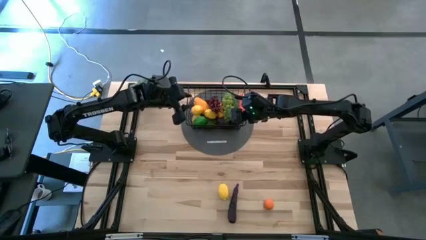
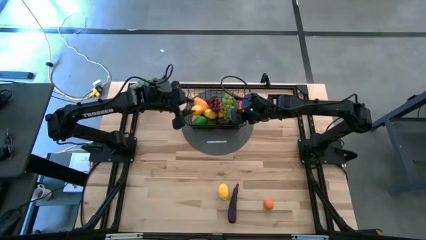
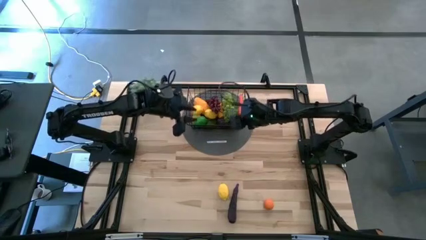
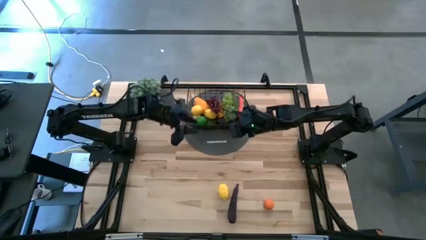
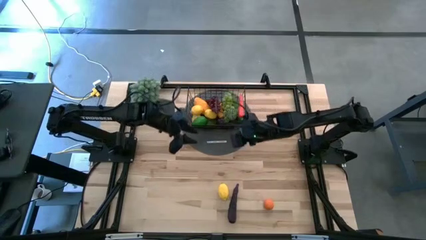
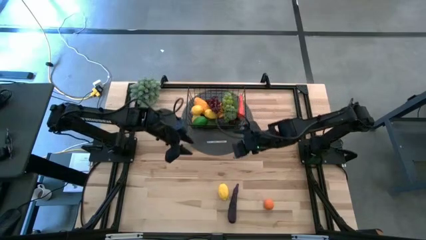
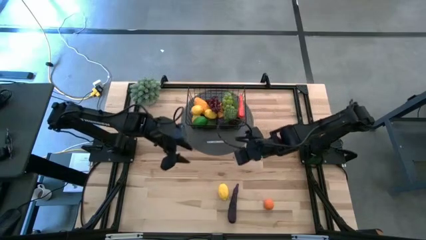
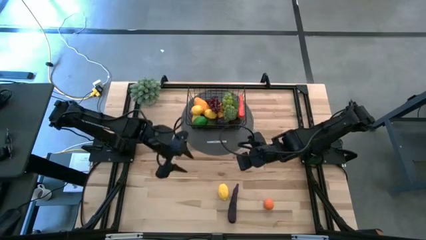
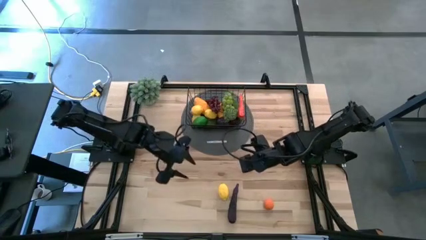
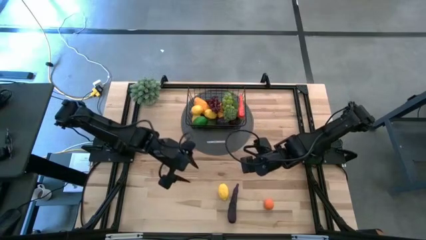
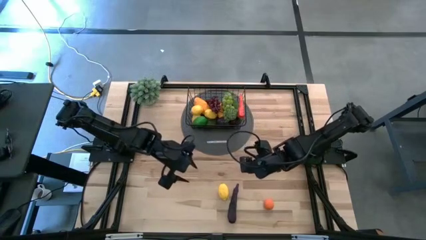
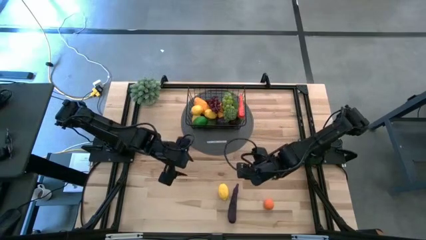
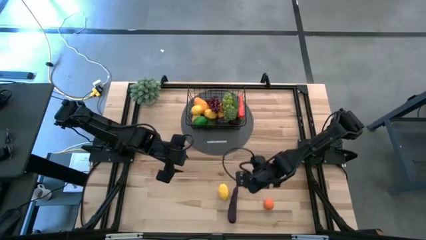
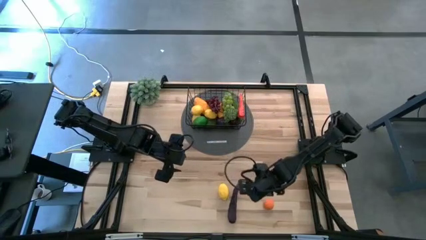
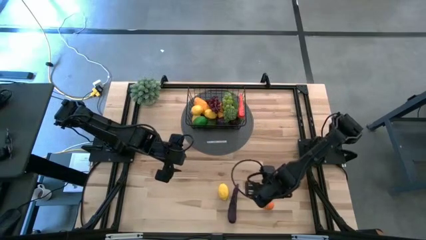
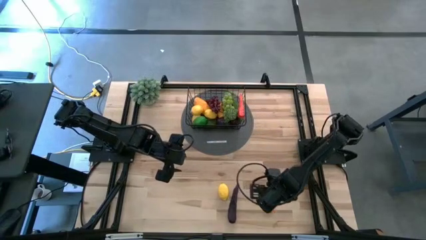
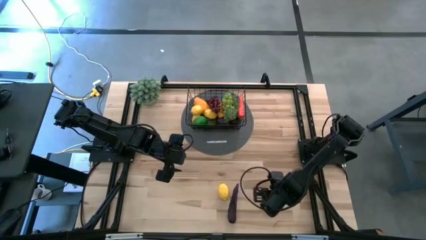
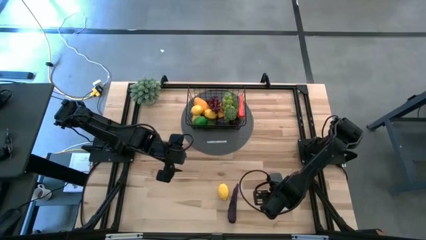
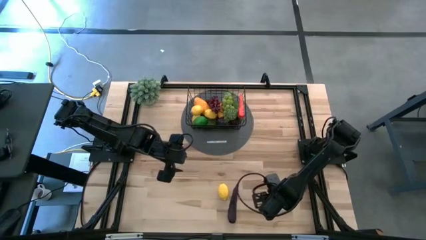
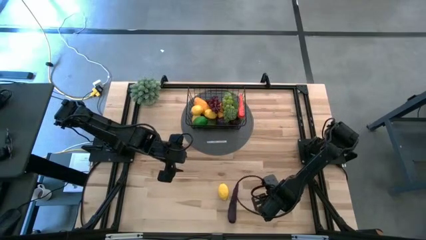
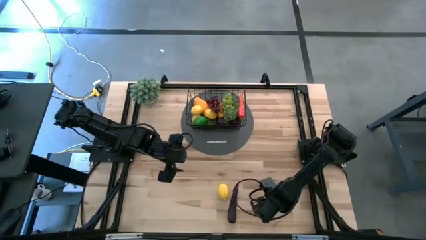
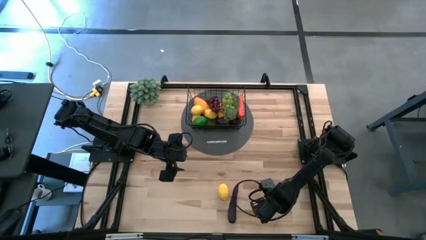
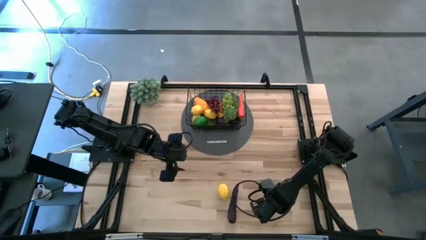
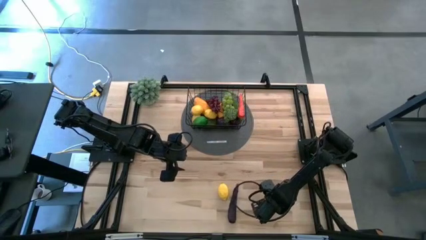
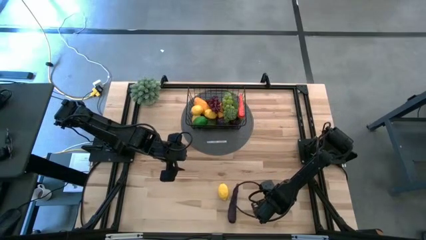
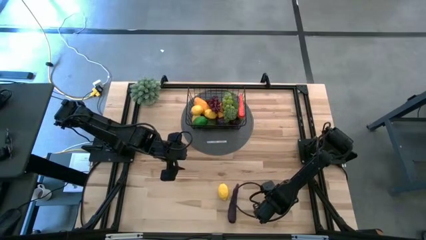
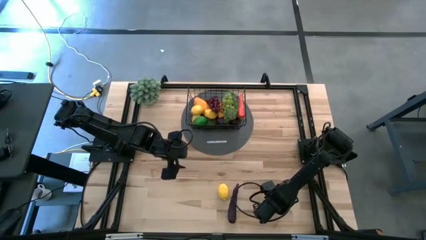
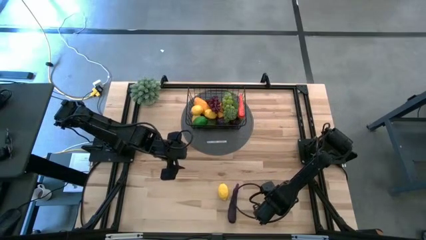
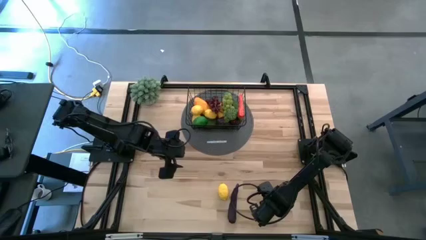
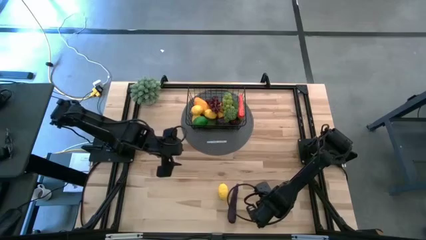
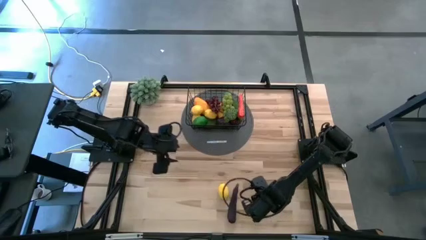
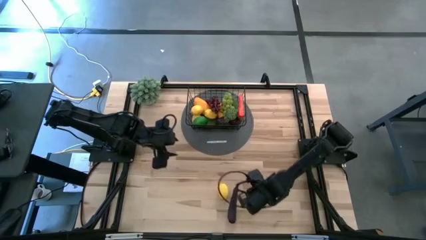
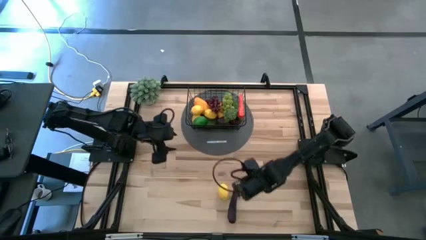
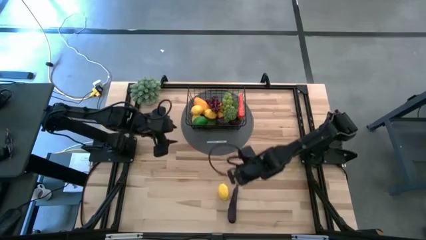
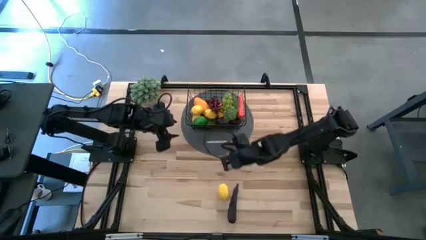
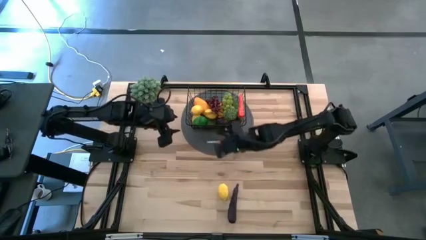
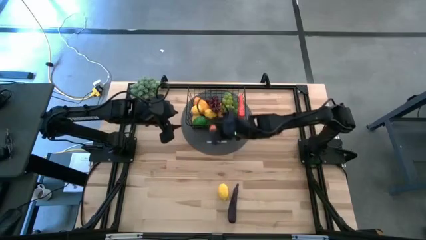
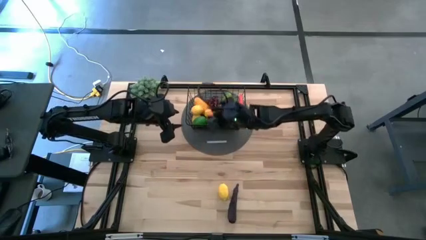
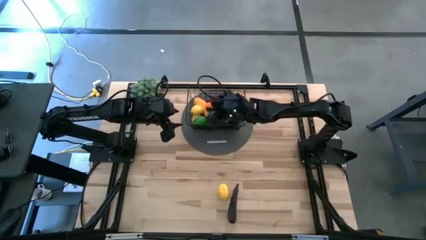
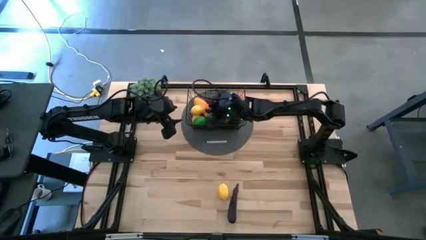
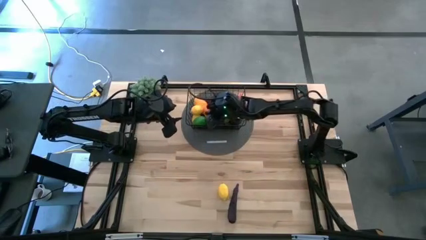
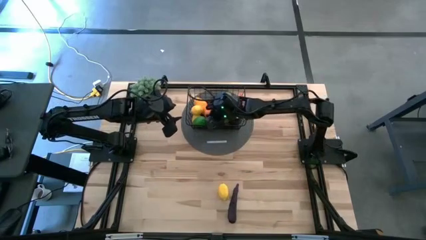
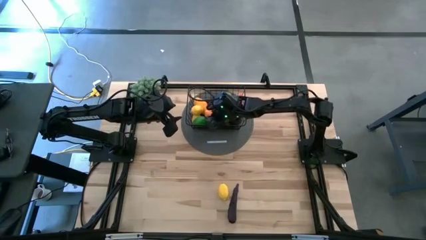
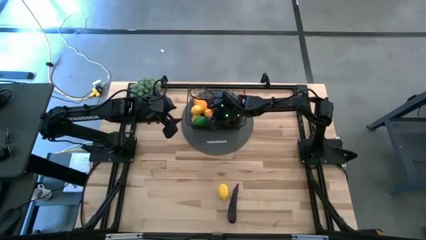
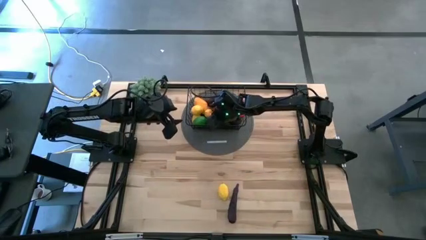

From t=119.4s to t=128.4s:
Task: Build produce basket
Put the orange into the black wire basket

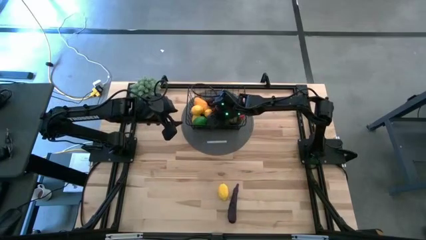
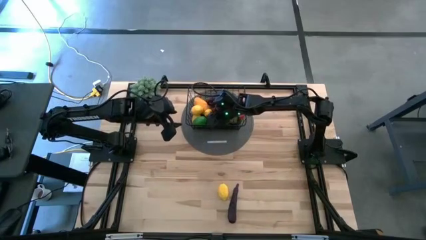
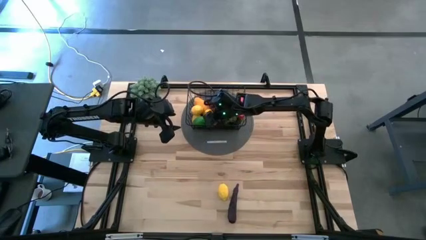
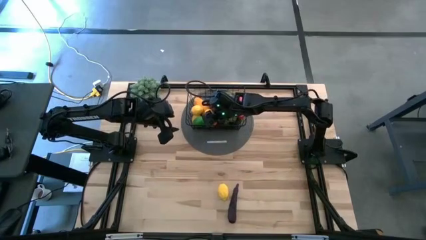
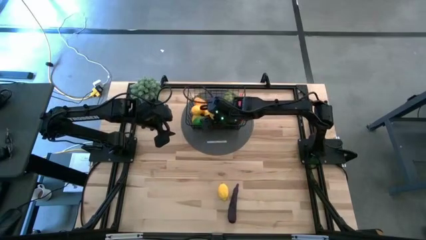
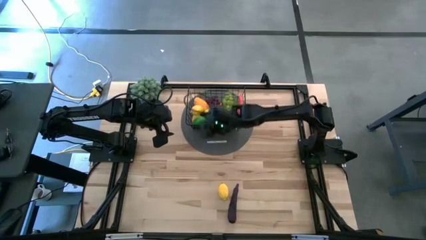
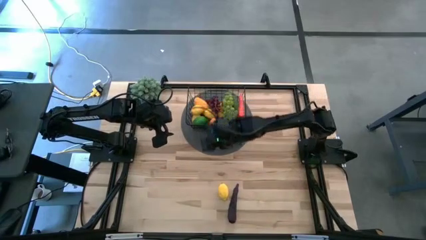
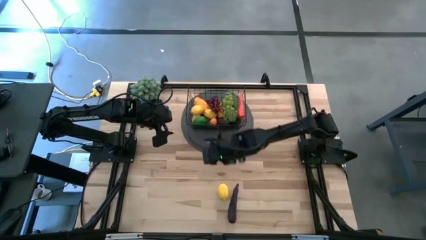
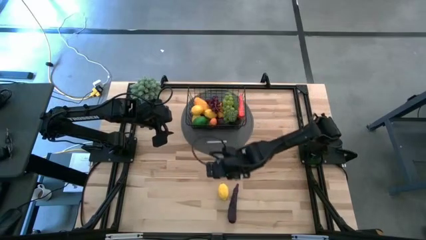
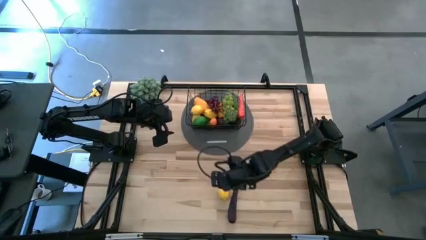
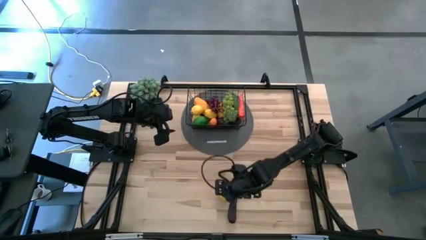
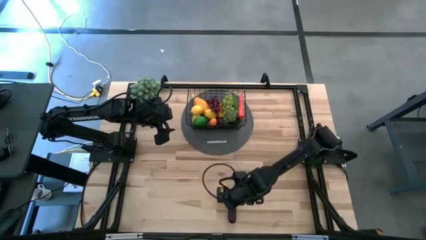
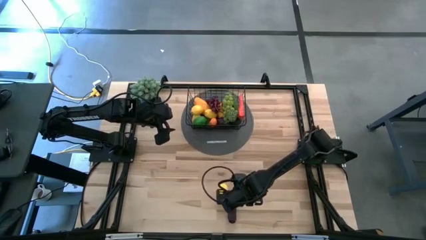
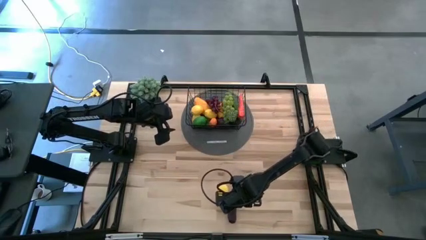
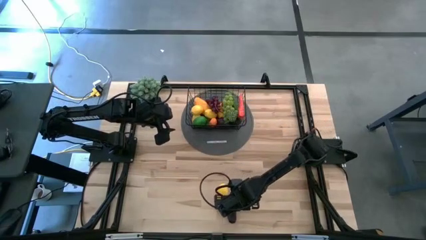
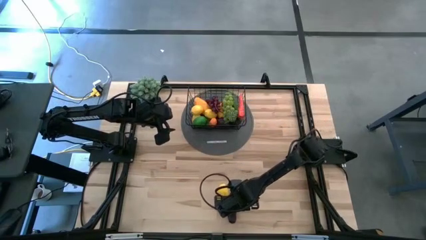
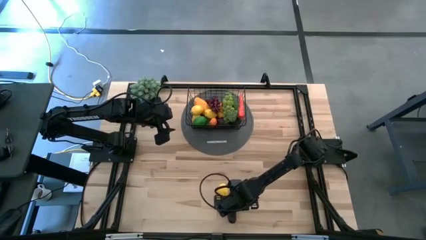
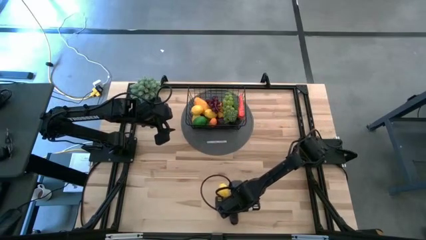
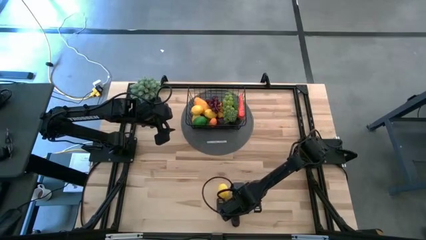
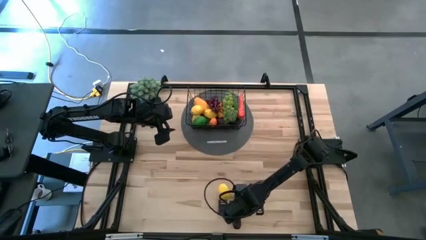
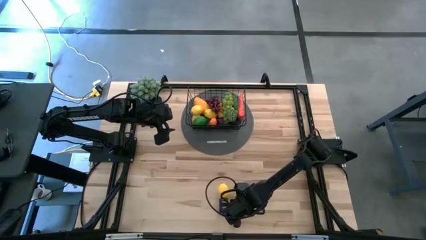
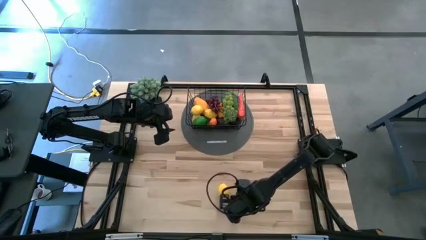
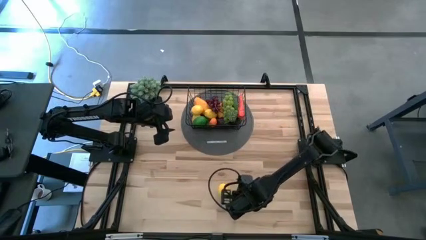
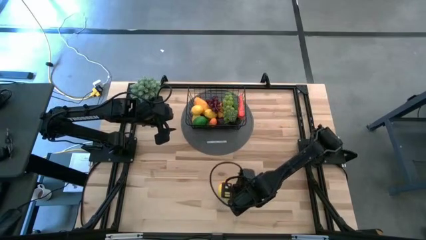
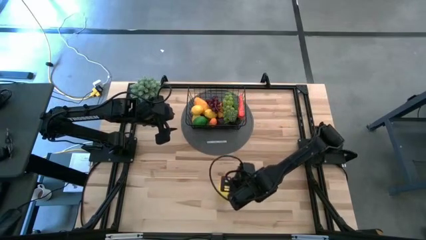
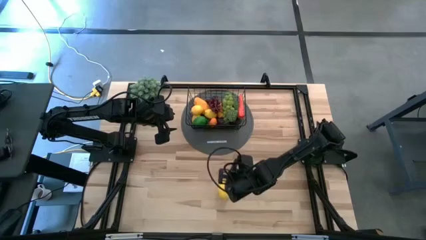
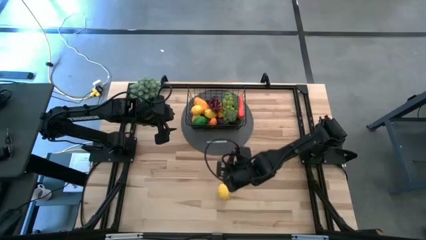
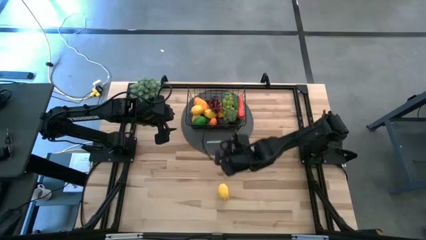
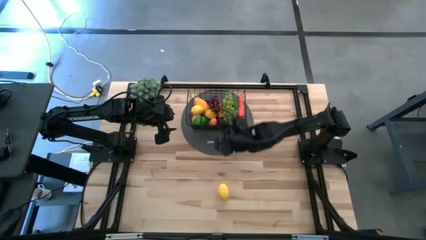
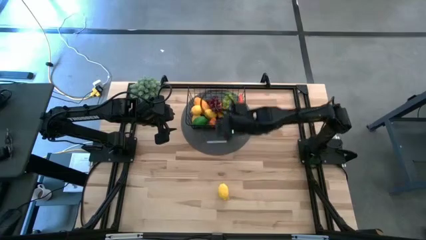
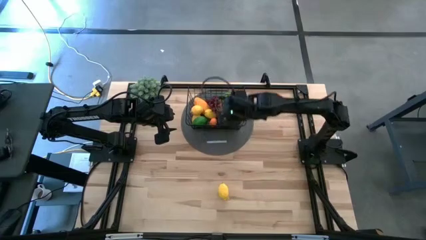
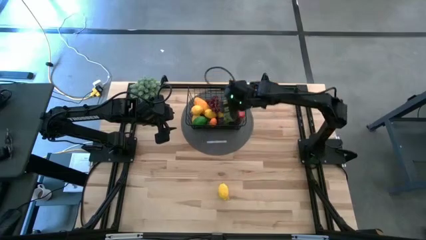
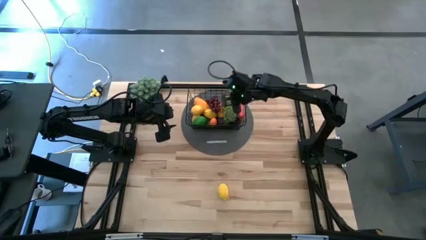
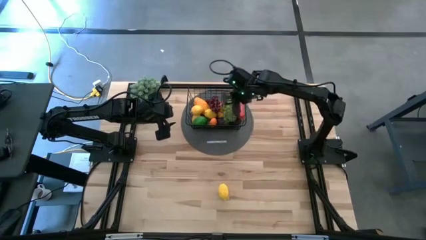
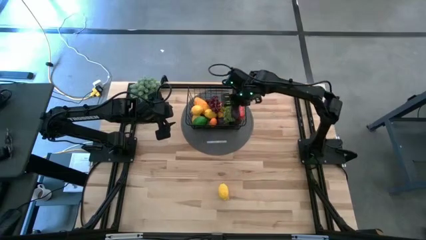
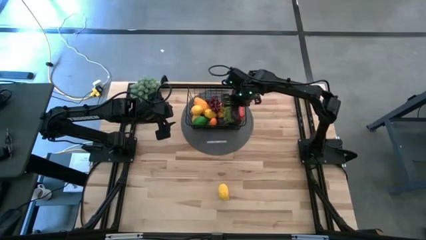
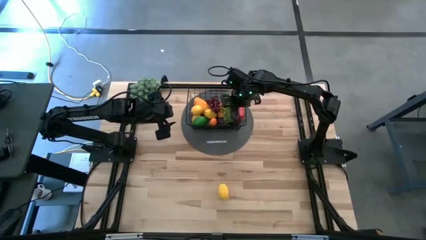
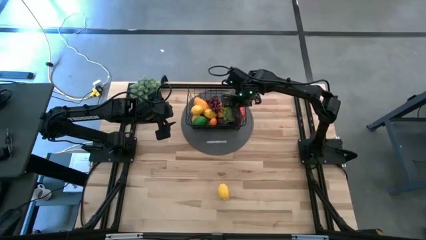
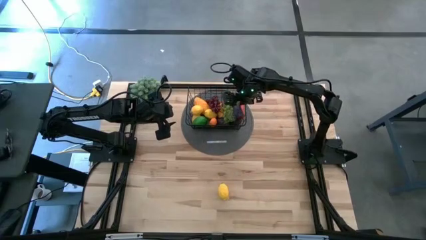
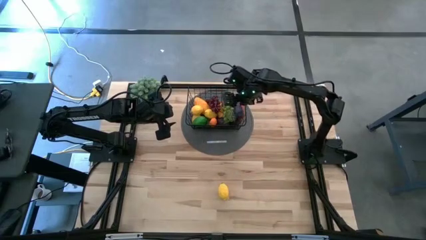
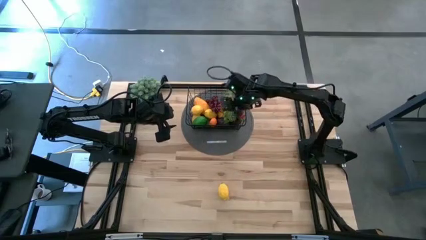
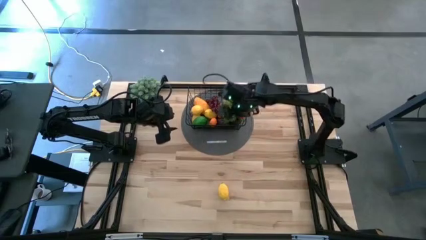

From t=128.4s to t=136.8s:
Put the purple eggplant into the black wire basket
